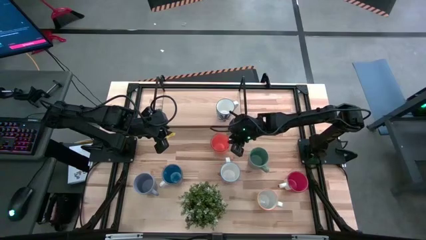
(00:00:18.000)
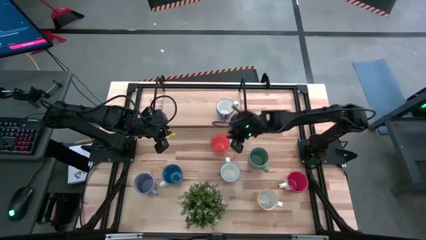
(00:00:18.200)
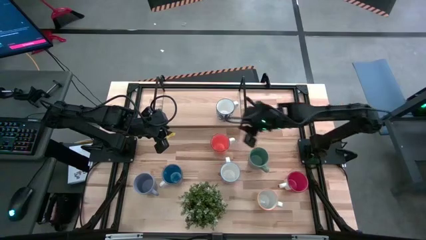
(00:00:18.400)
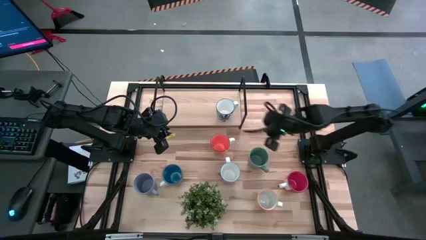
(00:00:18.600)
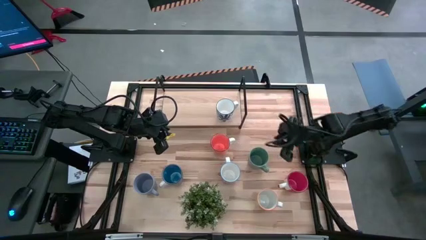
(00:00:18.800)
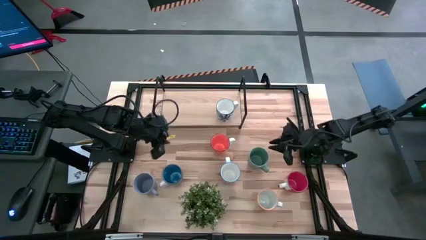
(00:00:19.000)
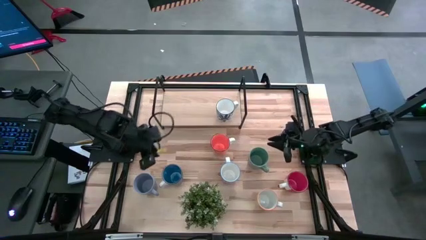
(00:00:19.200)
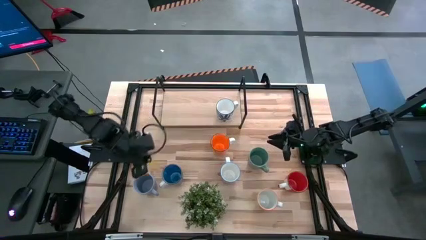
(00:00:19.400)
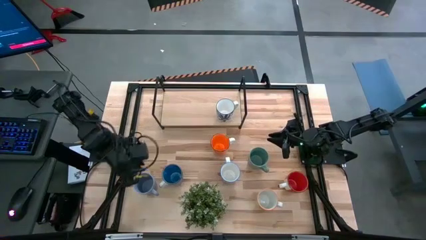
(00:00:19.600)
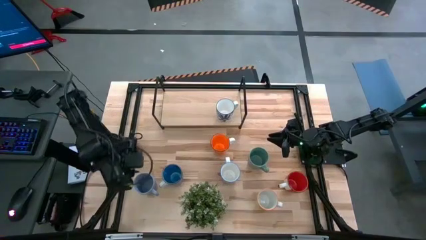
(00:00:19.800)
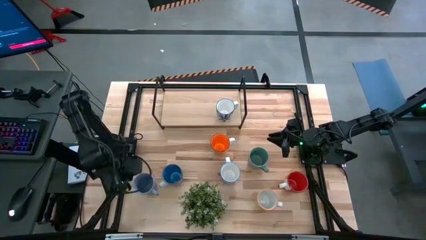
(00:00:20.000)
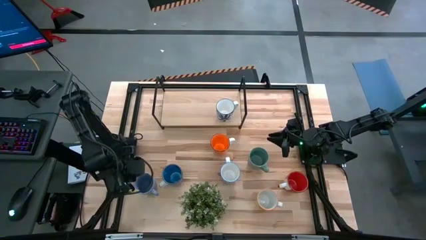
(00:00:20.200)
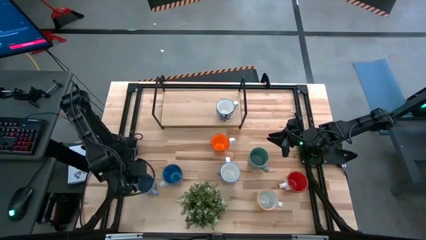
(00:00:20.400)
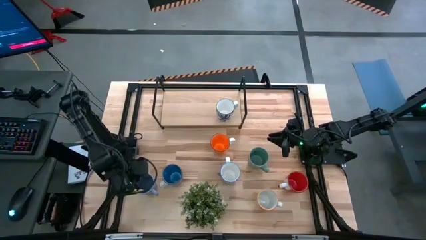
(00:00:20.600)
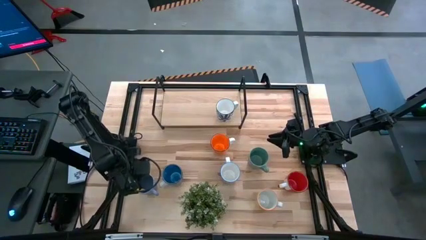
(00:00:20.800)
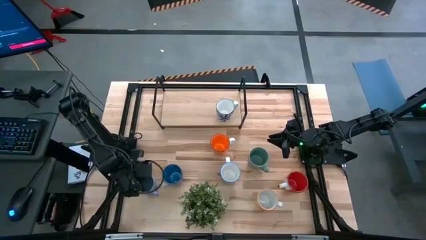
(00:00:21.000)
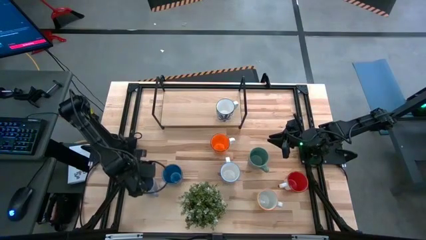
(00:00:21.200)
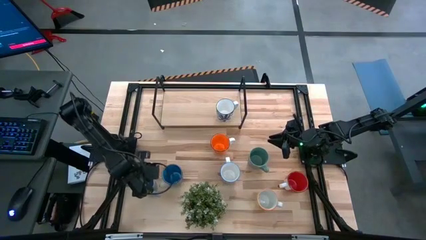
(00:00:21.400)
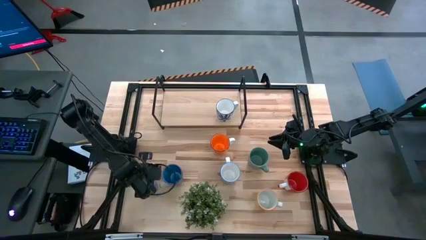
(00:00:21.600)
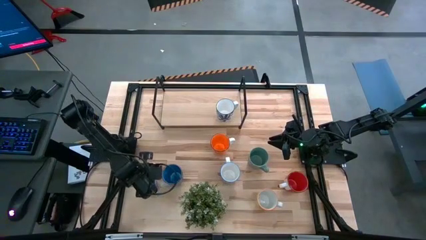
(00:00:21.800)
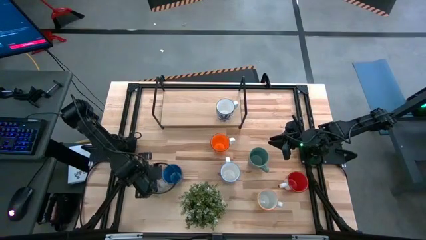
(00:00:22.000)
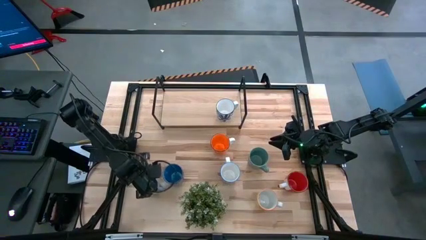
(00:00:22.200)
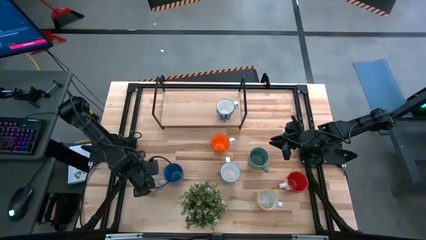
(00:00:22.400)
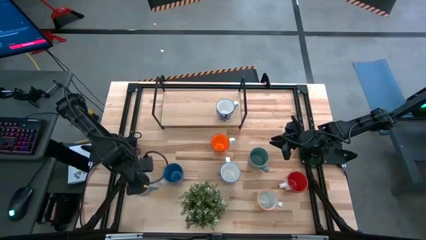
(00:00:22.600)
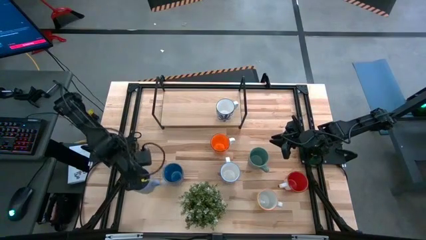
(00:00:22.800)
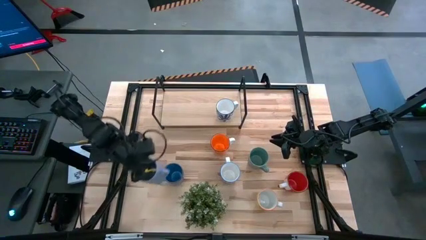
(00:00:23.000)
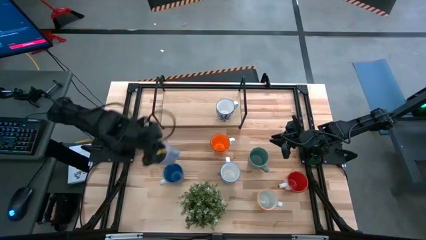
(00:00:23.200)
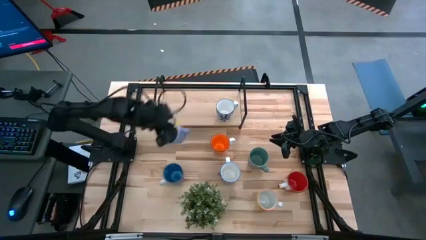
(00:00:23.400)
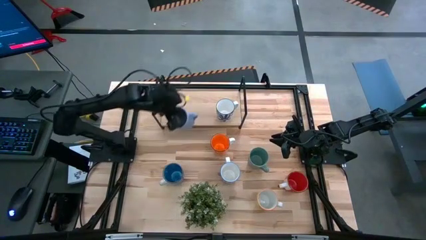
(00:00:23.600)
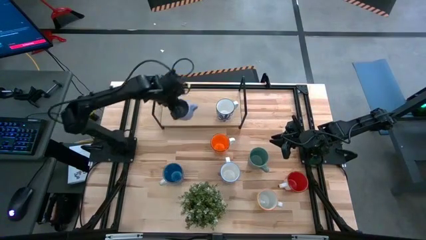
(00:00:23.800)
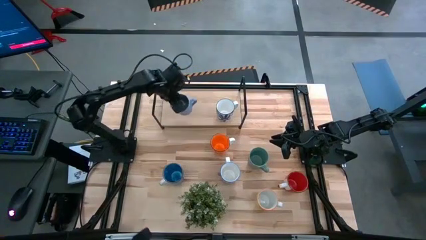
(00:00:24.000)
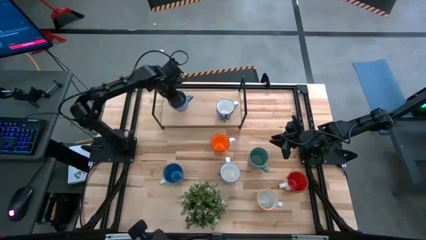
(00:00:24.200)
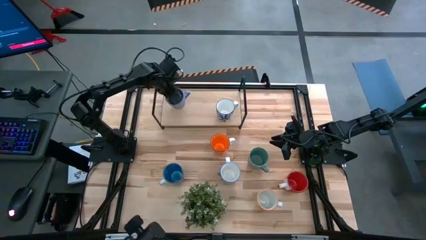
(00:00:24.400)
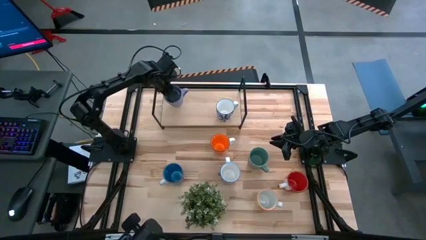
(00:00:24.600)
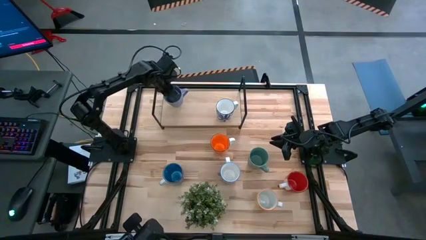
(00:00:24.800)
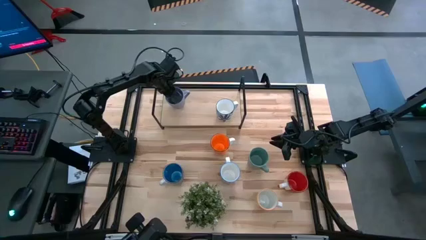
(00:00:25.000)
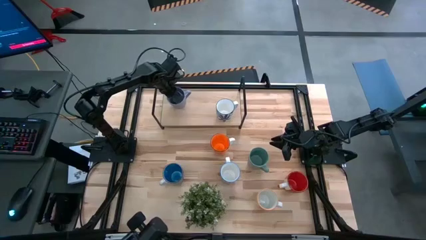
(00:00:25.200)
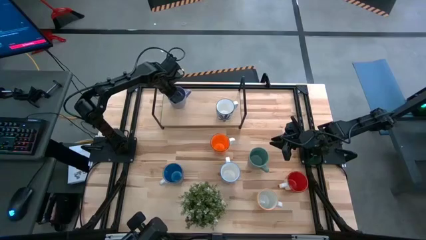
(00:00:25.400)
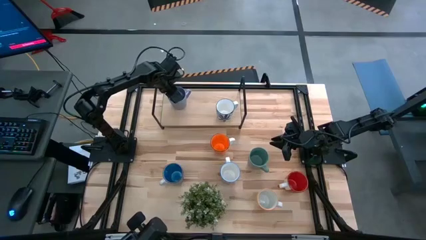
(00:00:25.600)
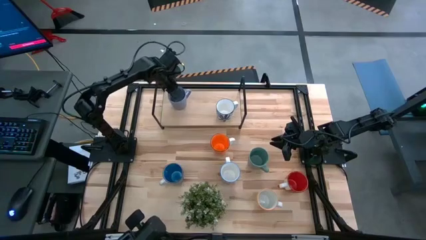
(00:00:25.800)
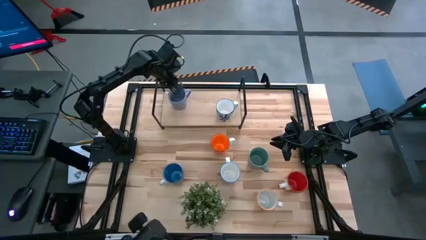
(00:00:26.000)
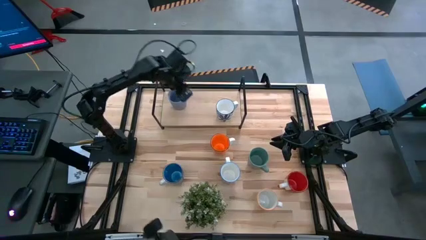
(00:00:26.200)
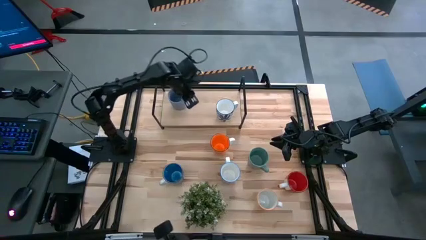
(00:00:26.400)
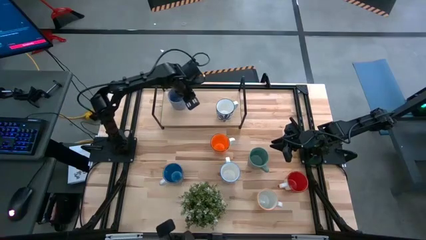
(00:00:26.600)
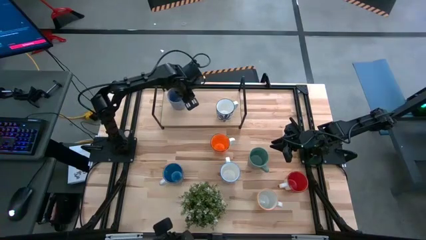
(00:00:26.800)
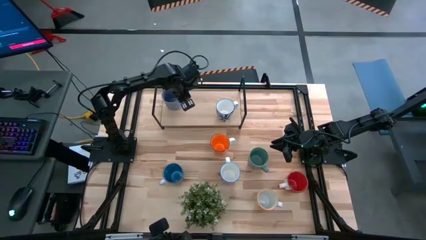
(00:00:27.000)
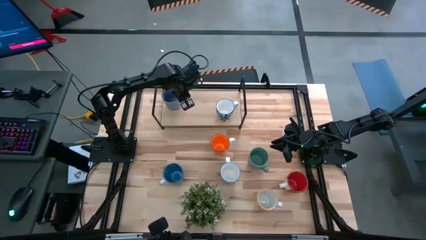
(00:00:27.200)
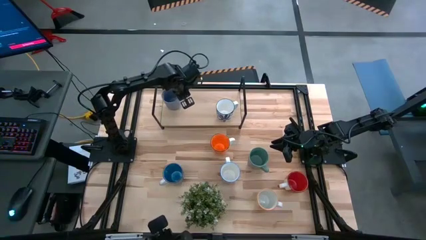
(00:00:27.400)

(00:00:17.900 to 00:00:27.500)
Task: Place coffee mugs
Put the purple mug on the shelf

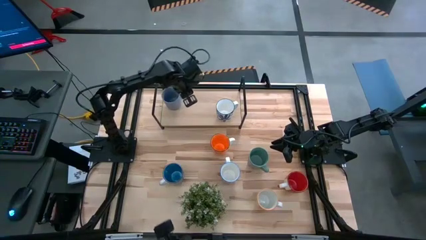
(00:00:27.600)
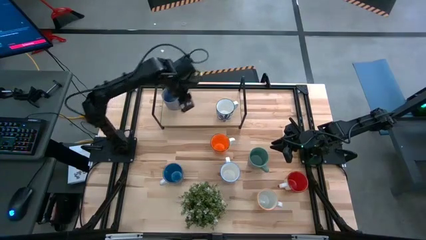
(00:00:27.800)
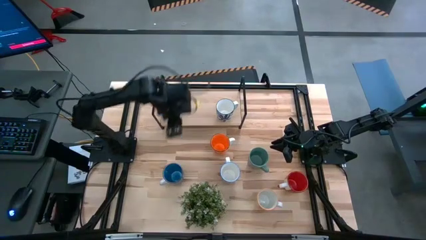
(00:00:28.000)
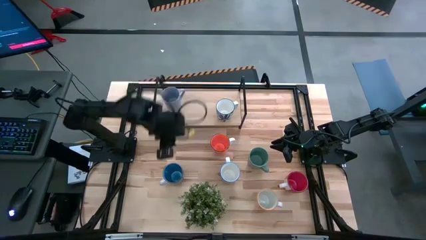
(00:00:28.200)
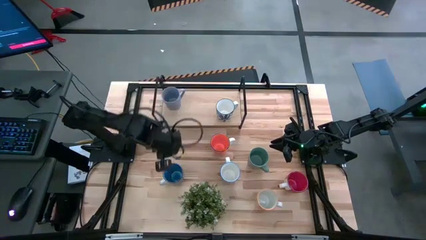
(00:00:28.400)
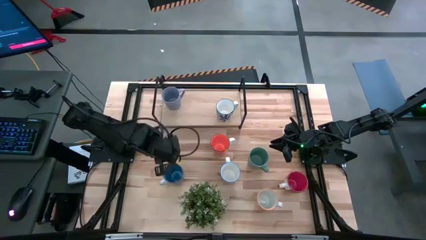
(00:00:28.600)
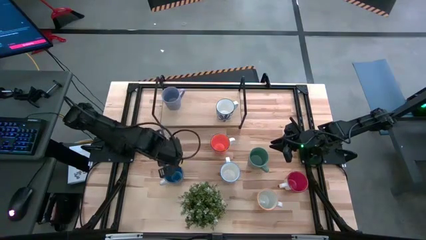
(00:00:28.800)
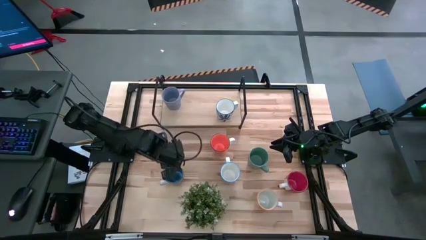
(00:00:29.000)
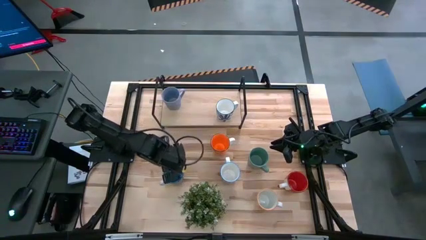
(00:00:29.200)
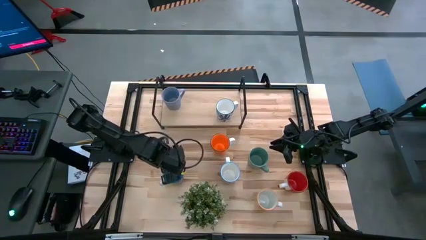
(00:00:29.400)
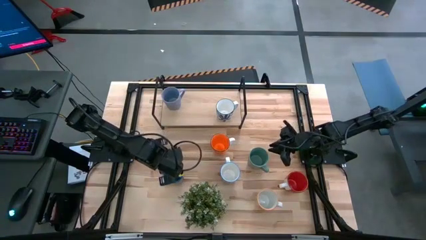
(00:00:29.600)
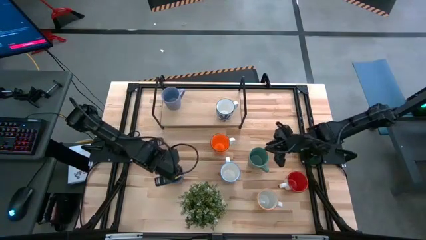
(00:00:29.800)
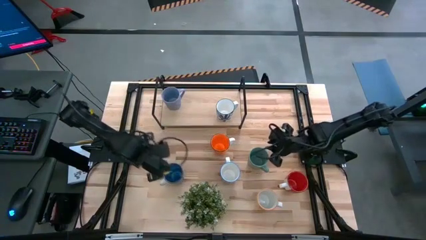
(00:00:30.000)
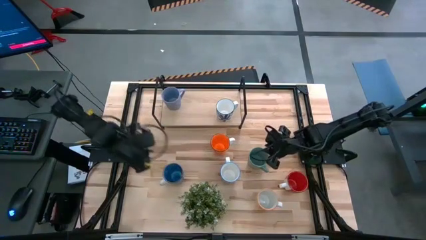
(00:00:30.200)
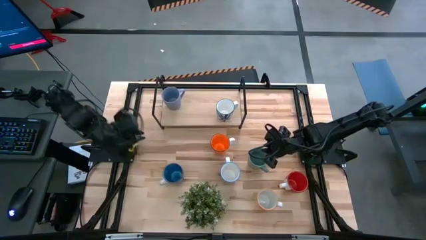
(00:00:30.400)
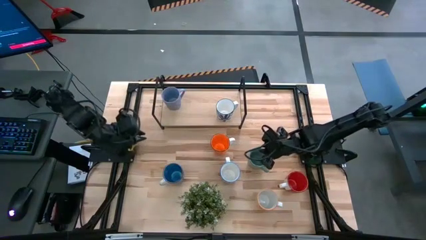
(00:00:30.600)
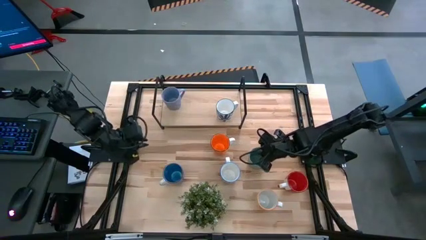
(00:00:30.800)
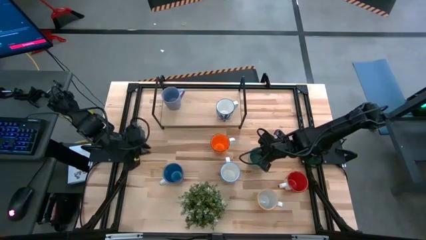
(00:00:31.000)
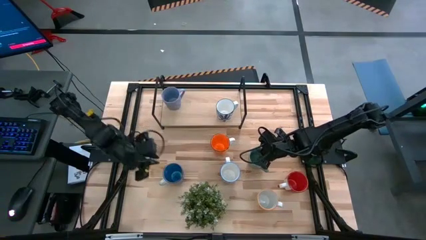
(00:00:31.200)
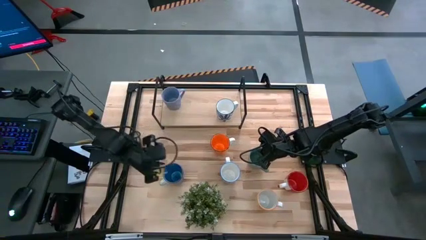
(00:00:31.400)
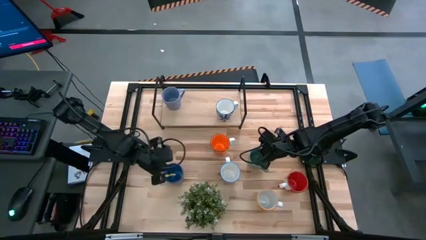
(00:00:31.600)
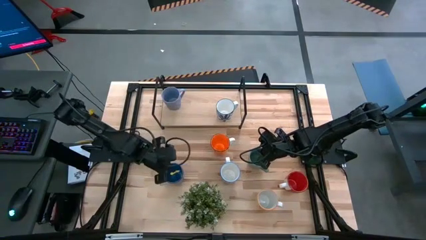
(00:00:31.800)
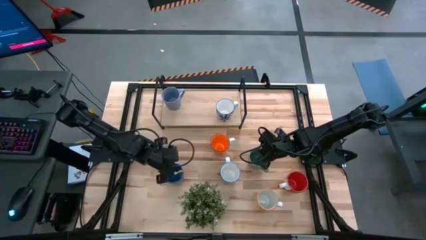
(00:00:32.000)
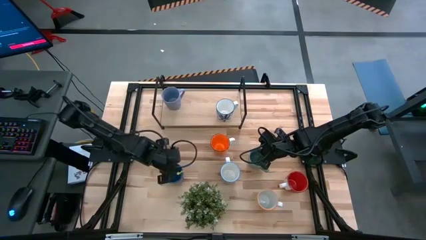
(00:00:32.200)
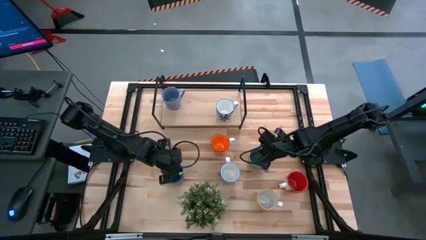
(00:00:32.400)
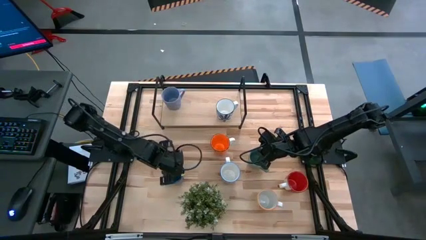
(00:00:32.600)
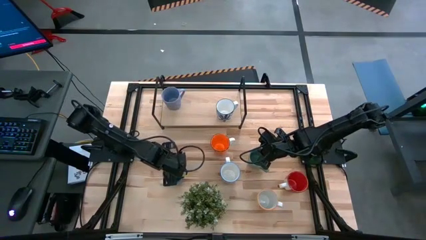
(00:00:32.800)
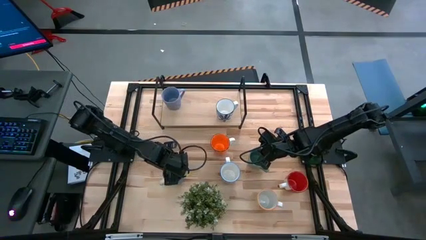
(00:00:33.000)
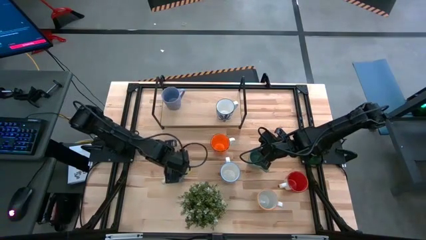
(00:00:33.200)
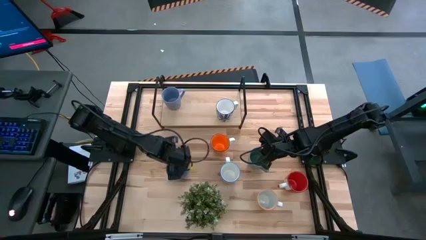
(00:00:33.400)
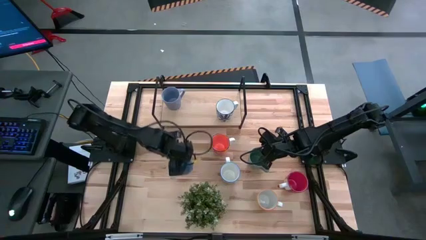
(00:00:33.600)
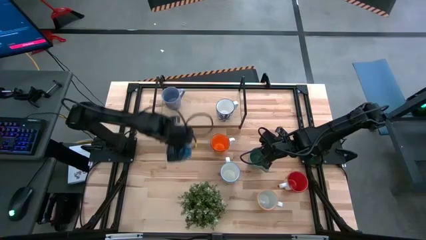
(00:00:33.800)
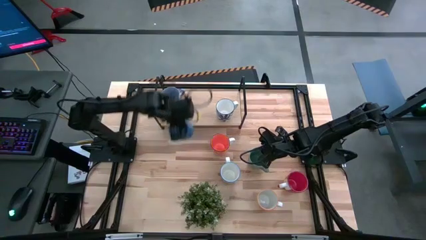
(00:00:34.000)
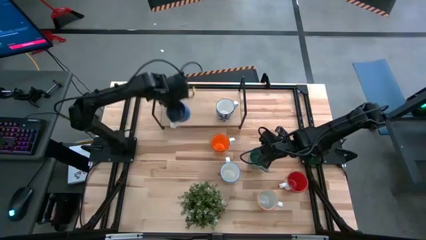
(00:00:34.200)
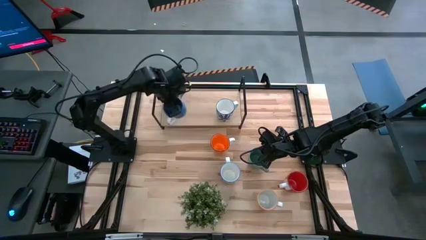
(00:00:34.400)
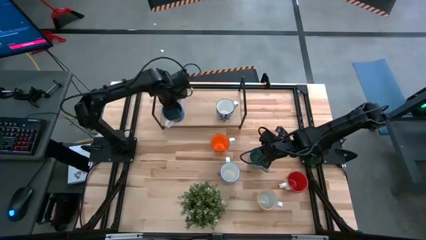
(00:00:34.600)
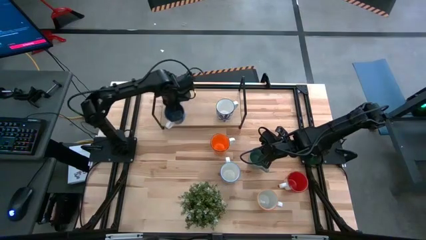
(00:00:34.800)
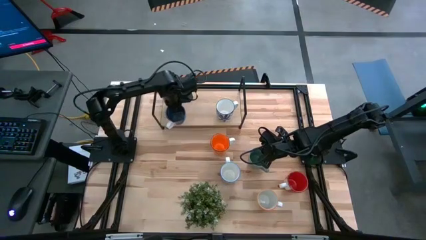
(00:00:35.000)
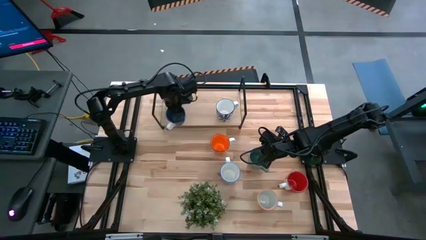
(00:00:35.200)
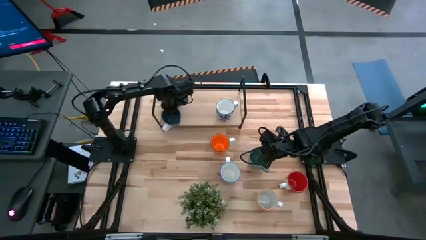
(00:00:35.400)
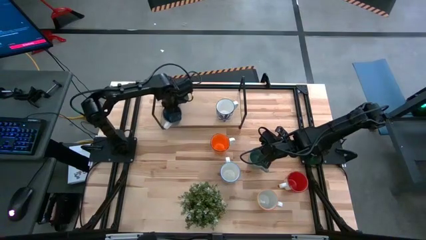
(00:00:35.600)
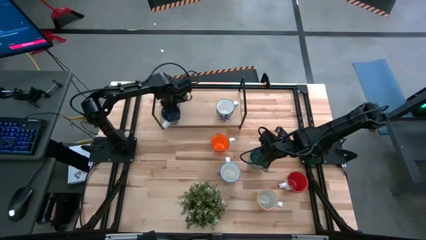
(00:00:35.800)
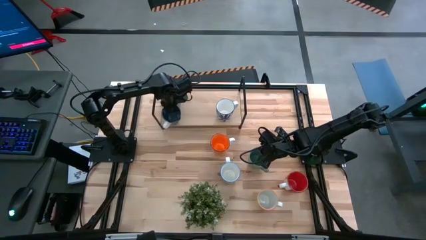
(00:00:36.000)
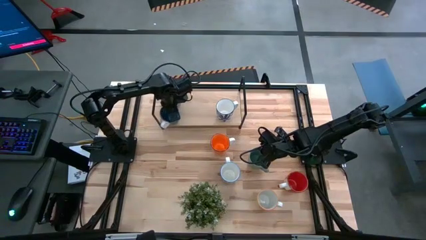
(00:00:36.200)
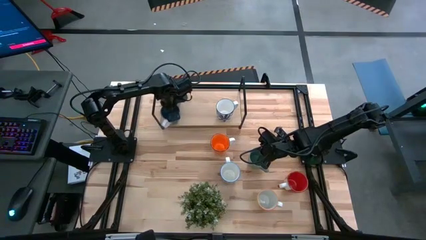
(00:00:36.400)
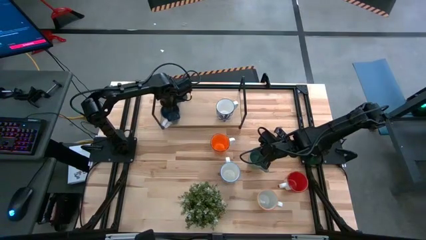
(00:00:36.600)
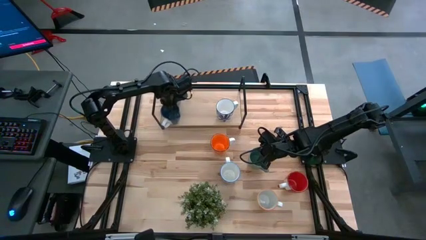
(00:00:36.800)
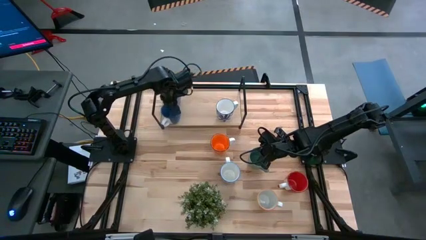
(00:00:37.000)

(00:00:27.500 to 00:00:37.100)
Put the blue mug on the shelf
